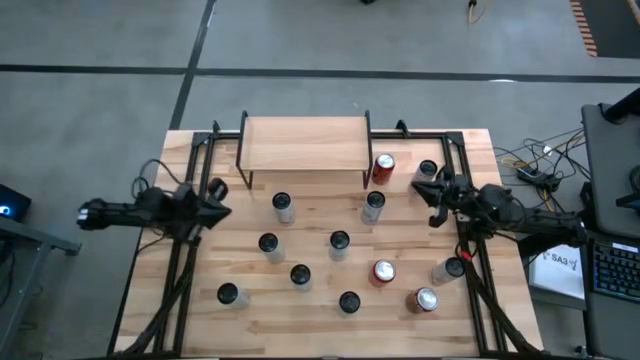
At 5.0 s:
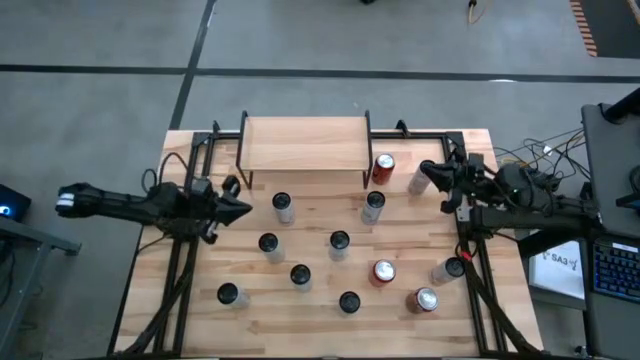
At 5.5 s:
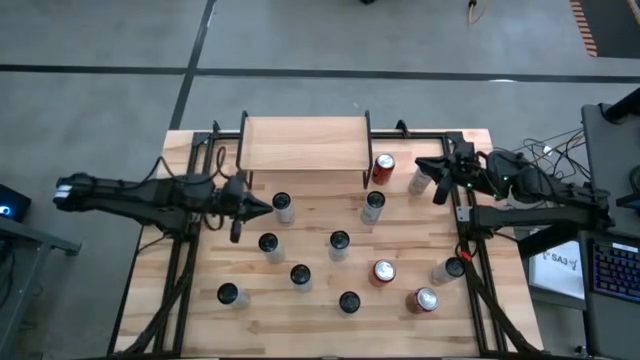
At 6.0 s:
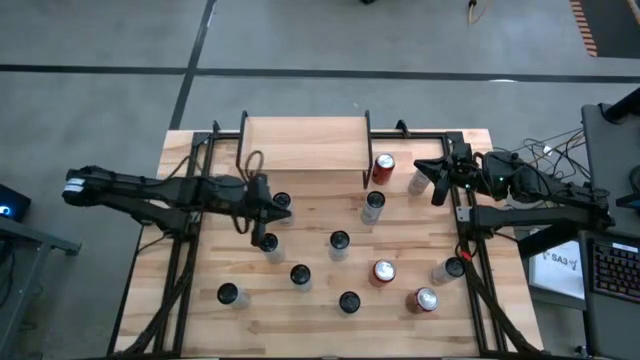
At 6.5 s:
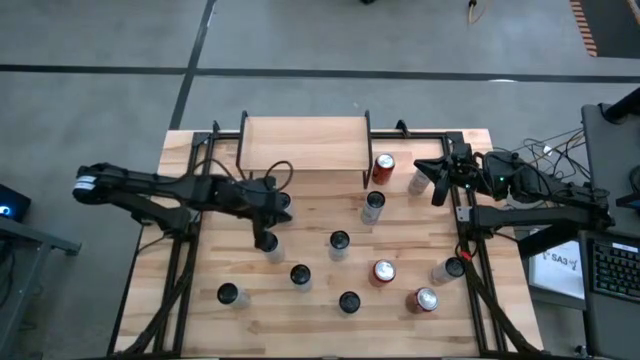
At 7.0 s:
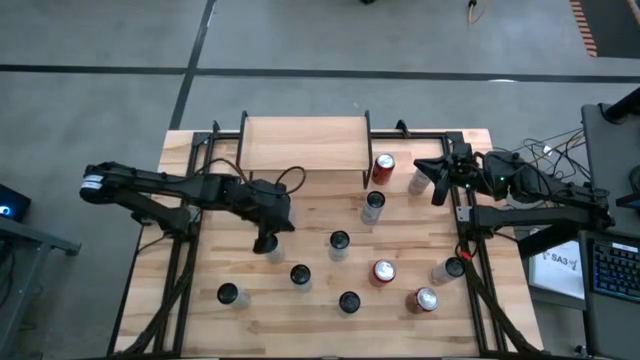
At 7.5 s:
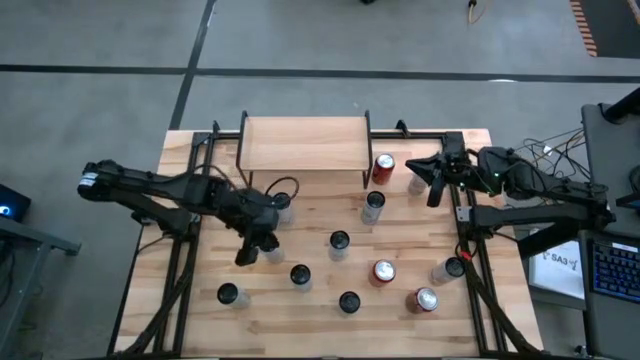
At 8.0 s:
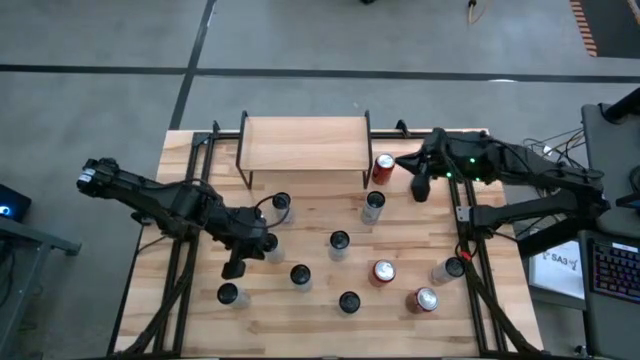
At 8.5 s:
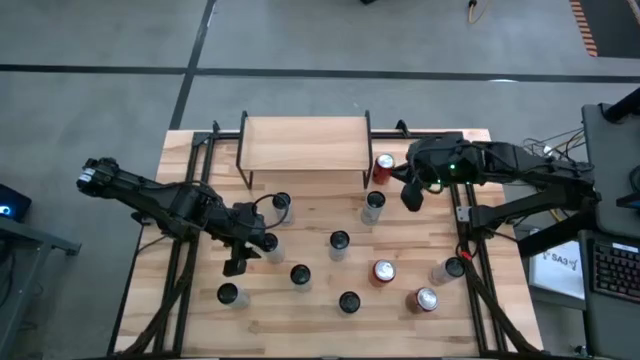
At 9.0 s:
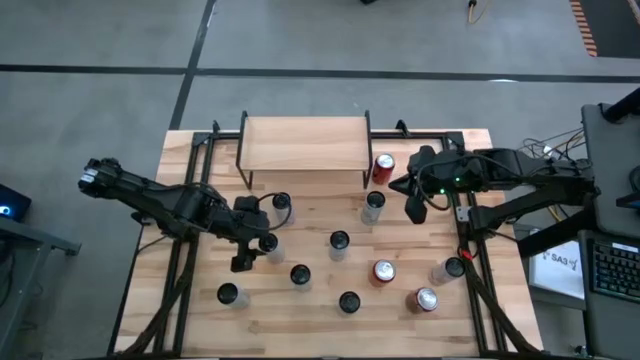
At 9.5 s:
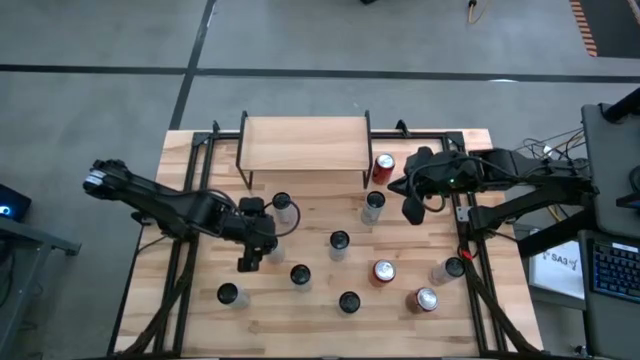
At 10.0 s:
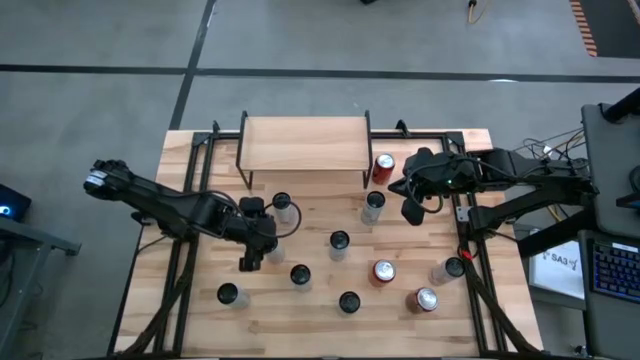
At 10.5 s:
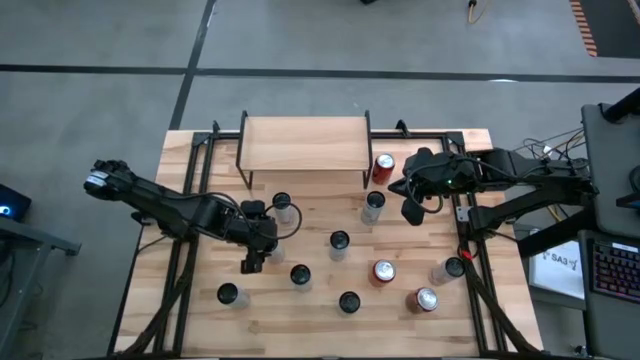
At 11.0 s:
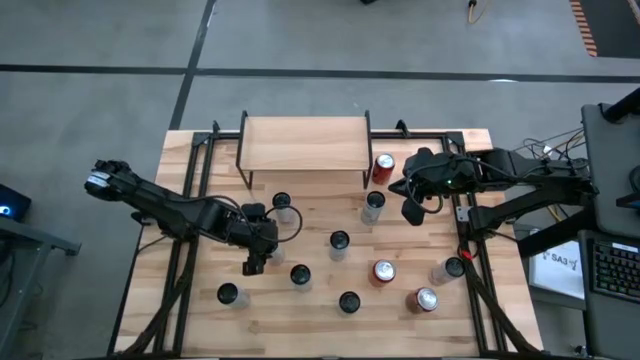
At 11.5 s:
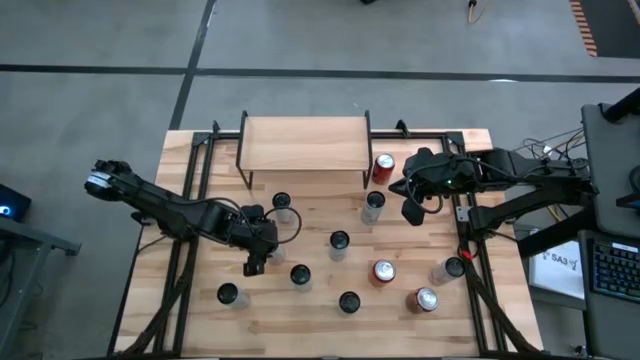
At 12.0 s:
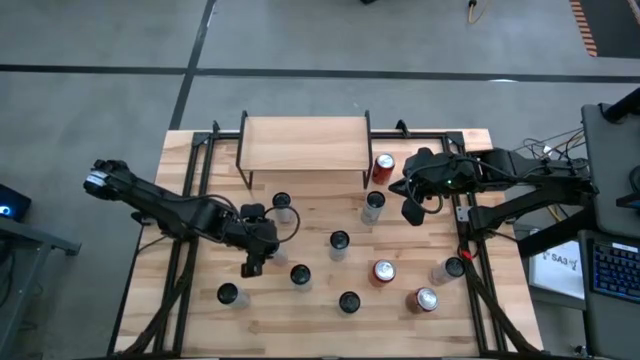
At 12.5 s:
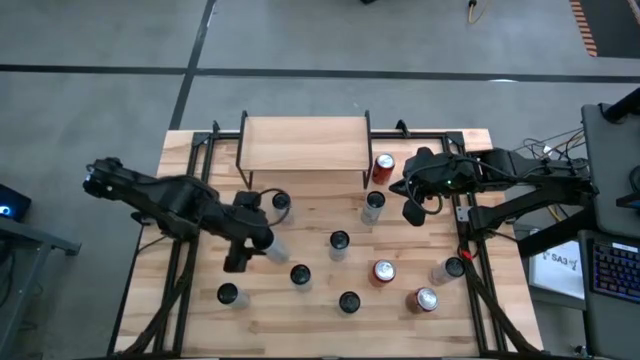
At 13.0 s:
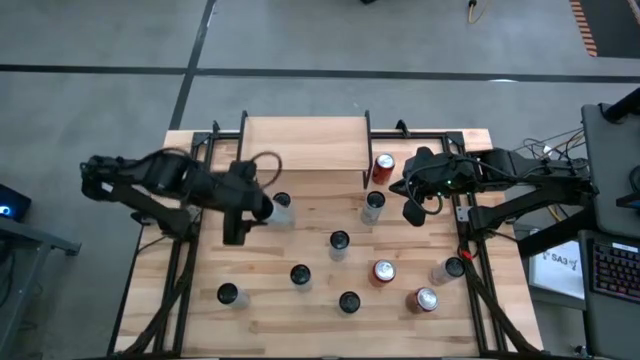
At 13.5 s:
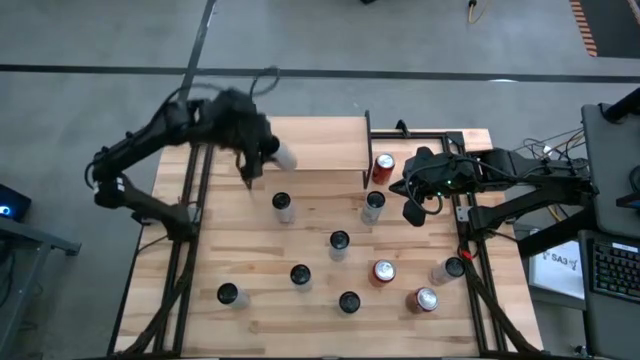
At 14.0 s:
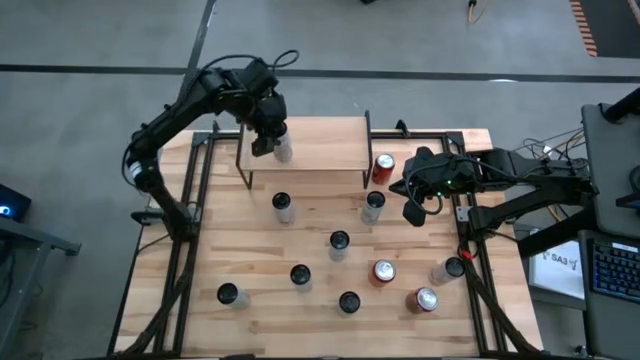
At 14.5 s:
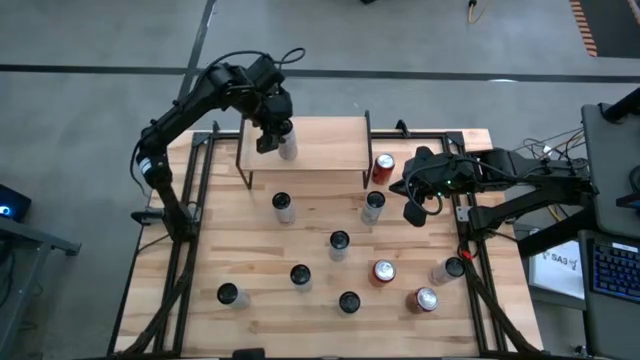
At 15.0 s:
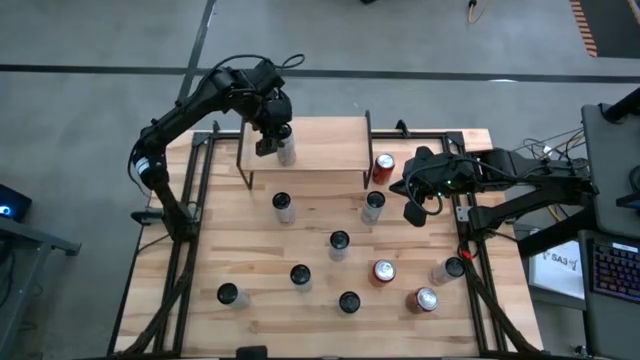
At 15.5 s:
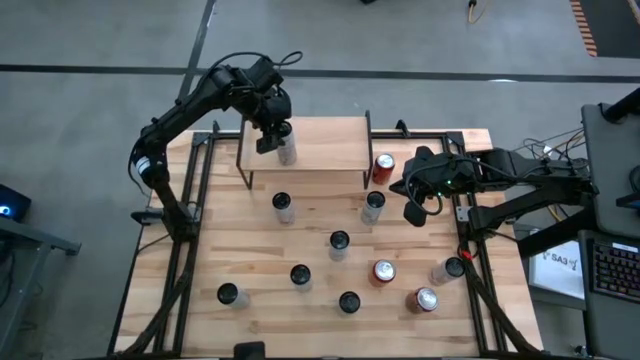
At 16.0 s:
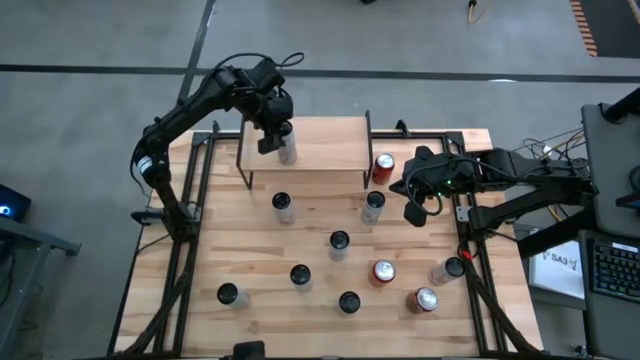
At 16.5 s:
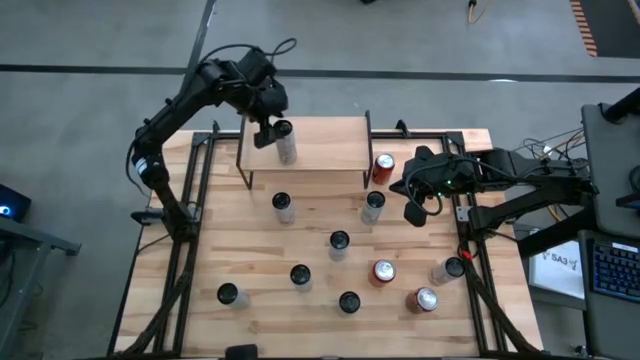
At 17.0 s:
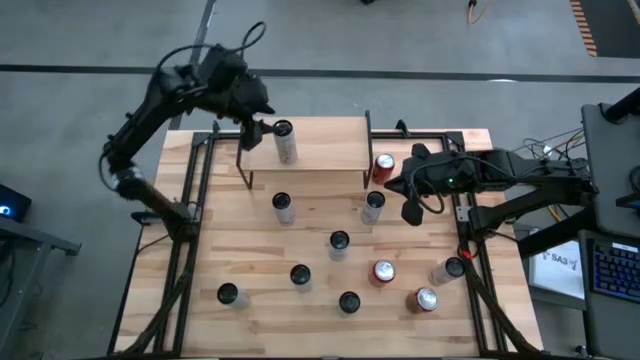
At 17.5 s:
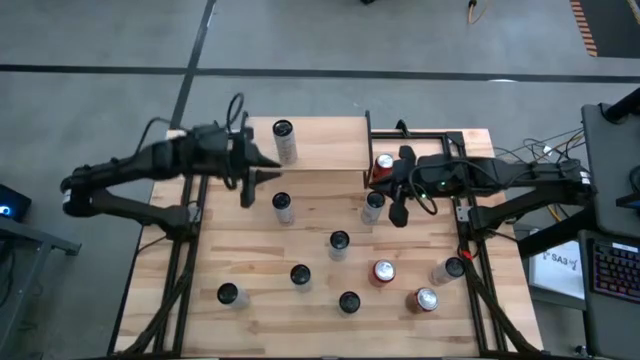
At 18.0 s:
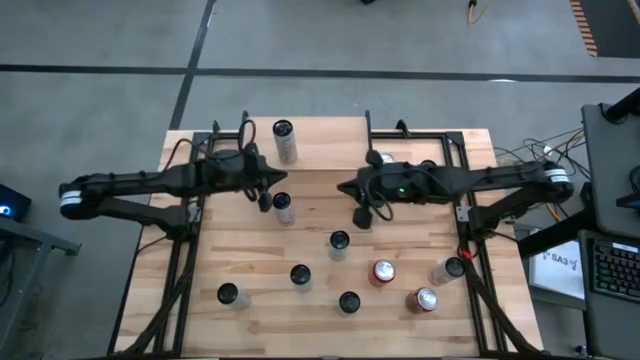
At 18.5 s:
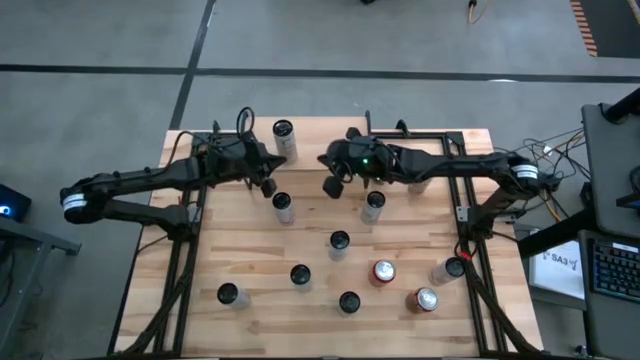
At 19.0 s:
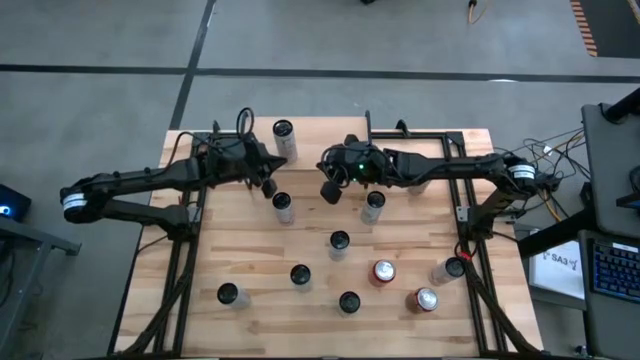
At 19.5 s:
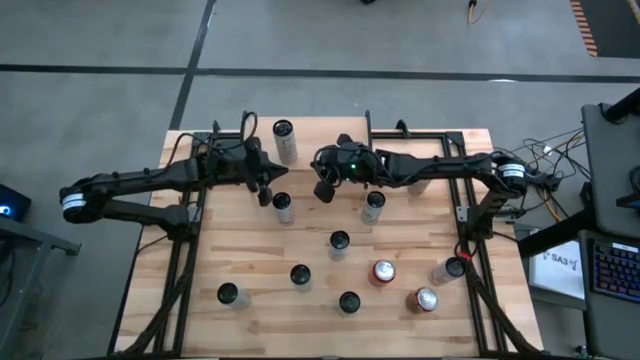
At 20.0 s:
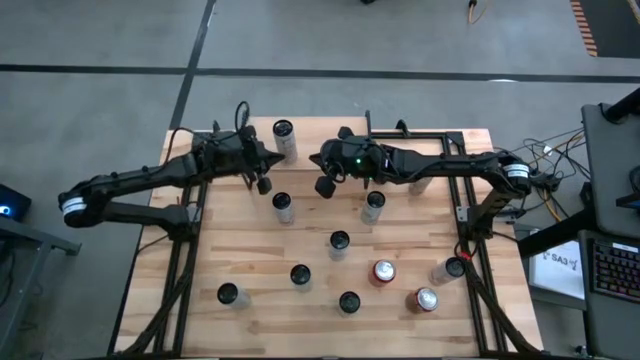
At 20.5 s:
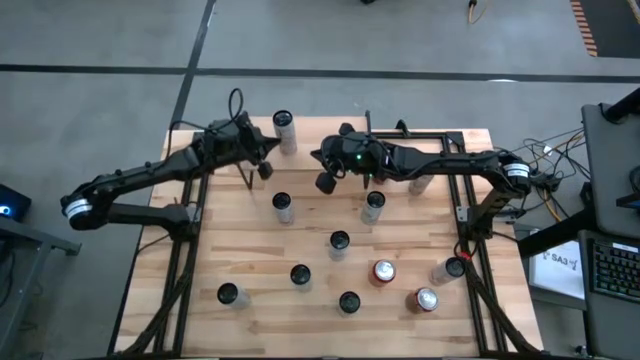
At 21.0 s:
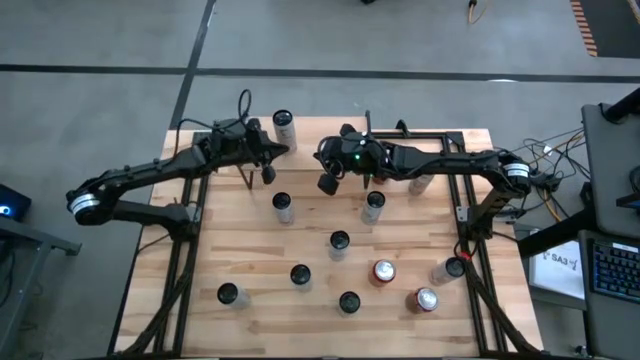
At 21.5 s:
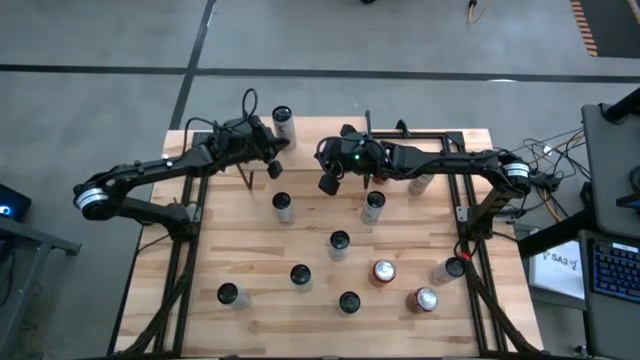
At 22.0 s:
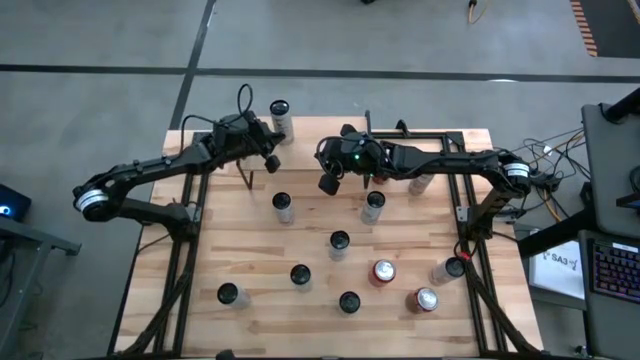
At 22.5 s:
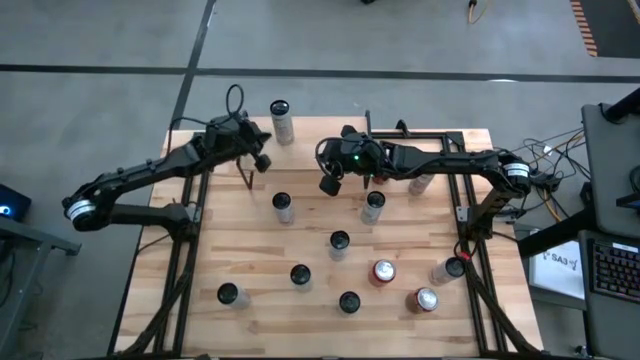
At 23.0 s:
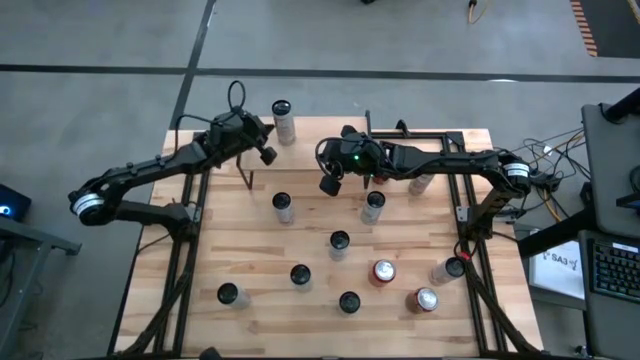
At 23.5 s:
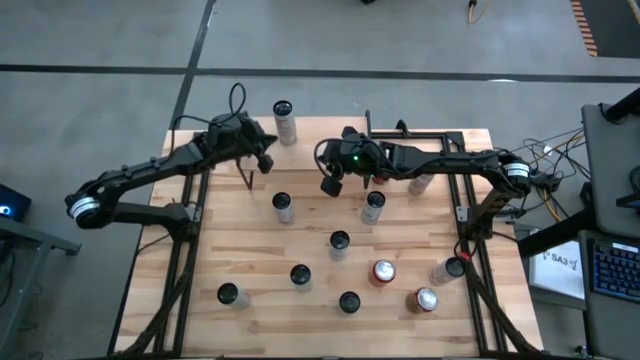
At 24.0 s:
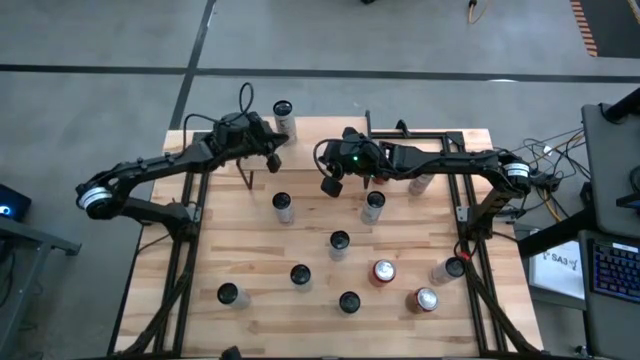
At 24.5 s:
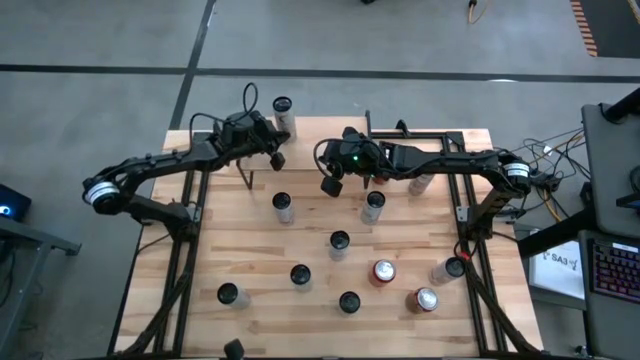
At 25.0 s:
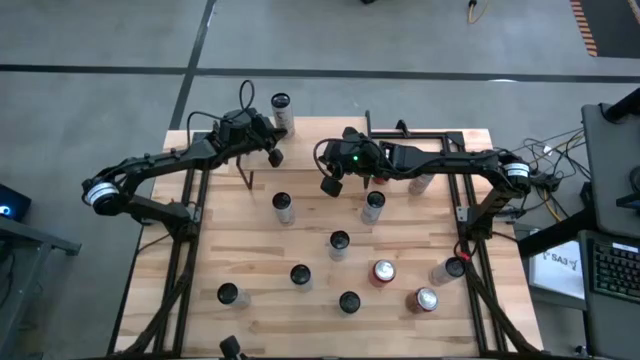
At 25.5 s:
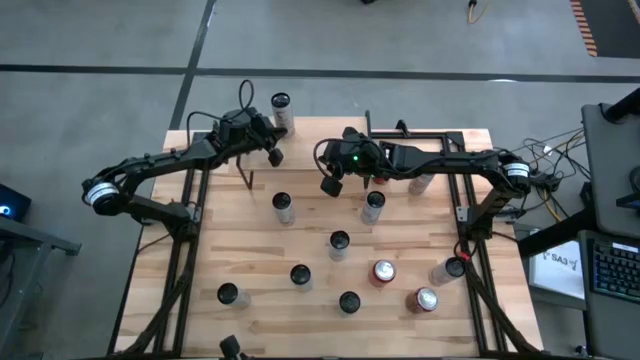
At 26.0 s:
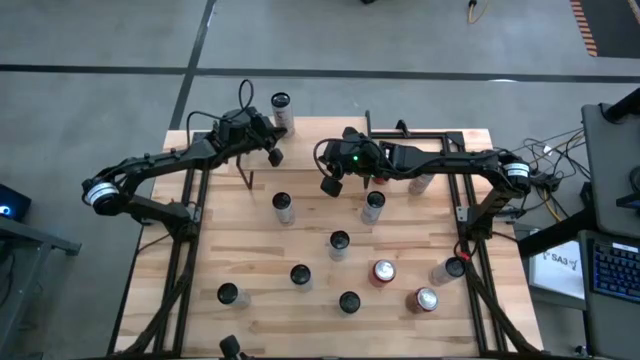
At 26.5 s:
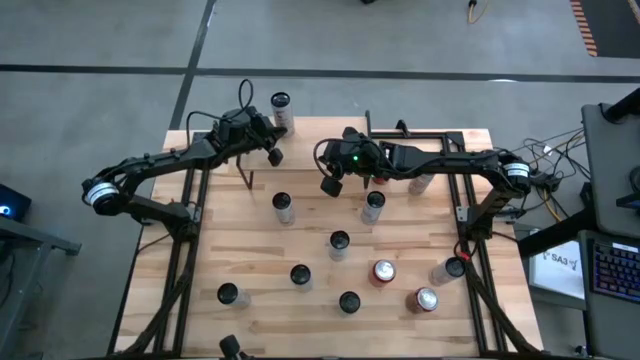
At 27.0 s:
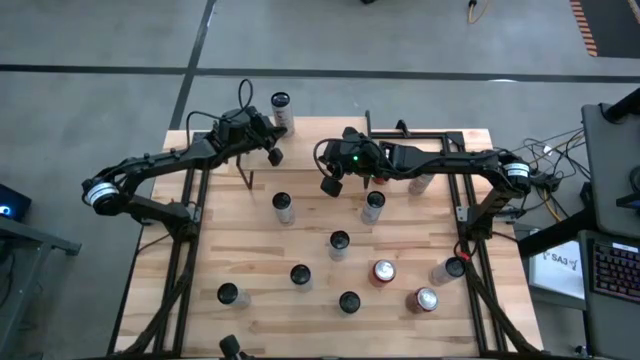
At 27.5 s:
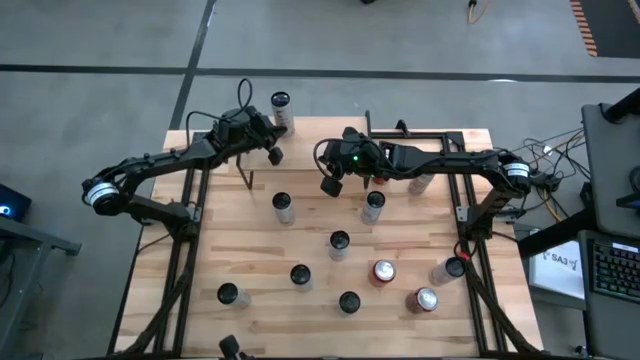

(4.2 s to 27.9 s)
Task: Place canned beverage on shelf
Put the white soda can on the shelf
